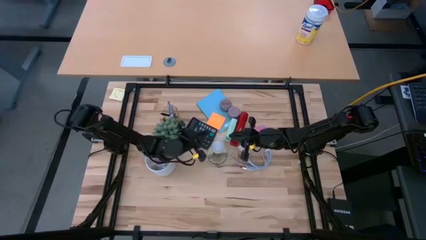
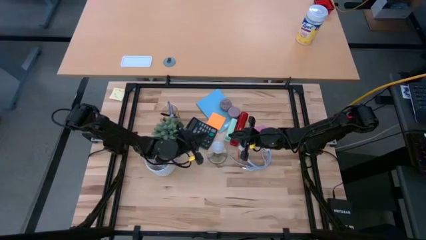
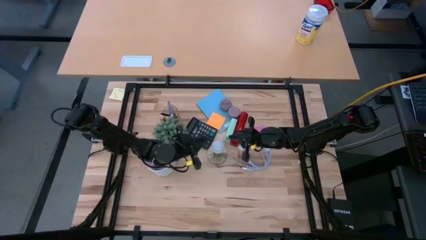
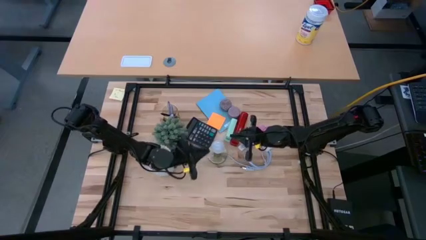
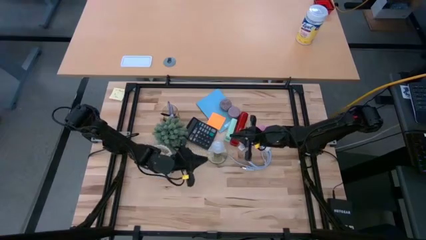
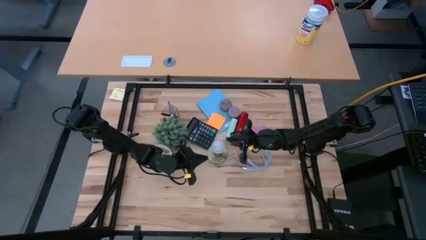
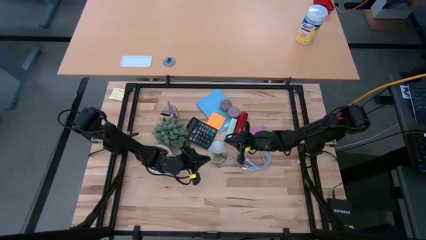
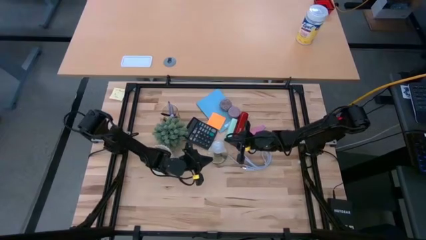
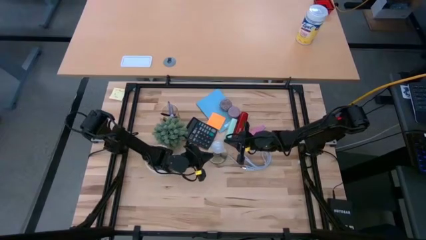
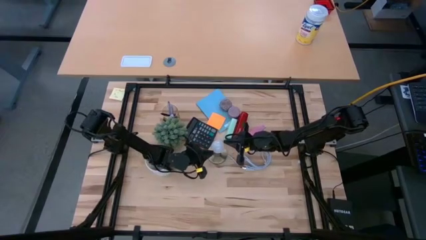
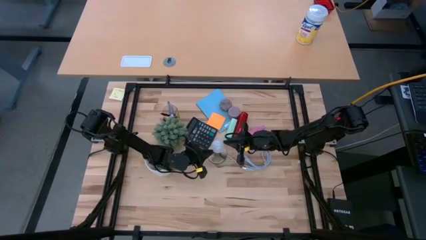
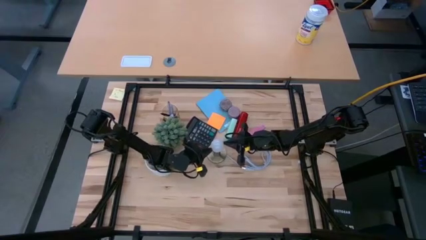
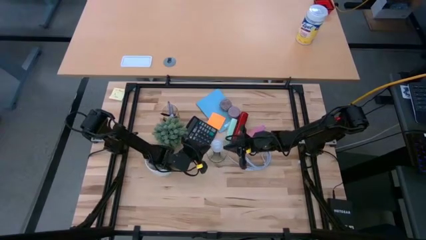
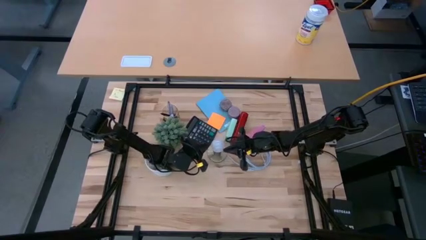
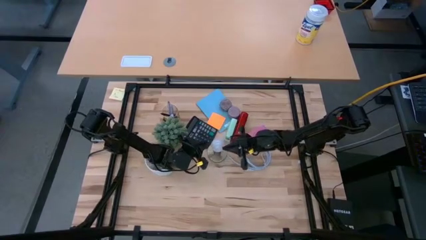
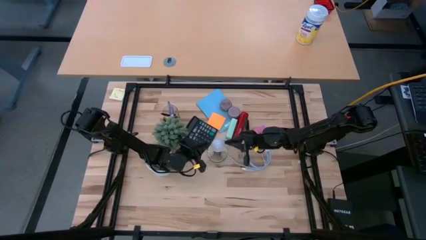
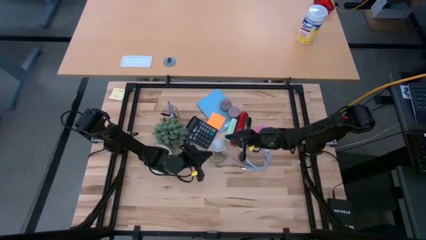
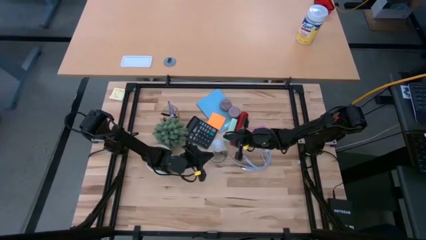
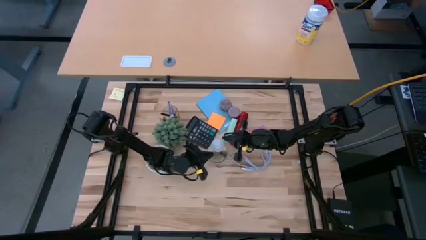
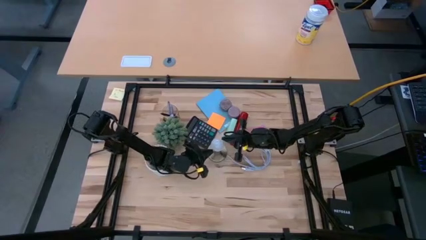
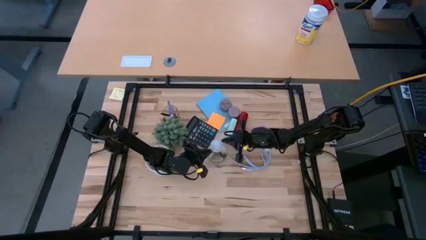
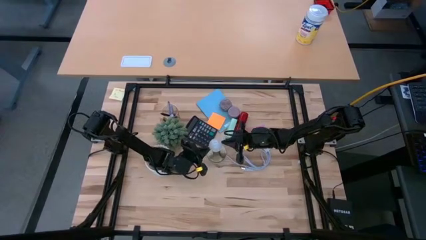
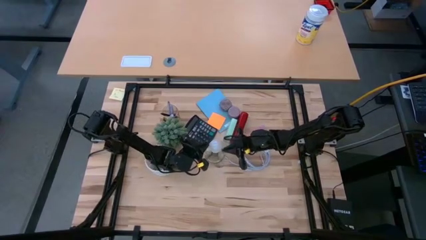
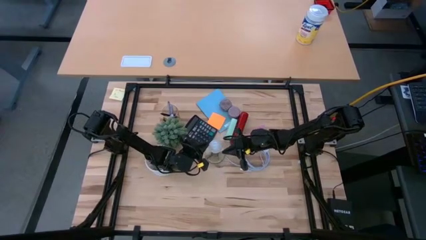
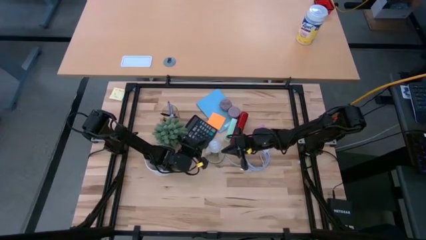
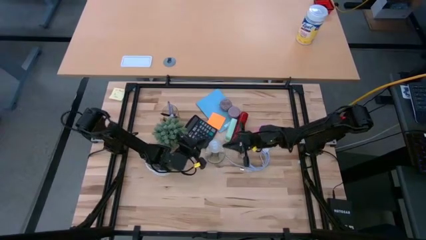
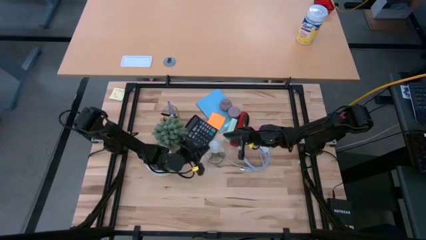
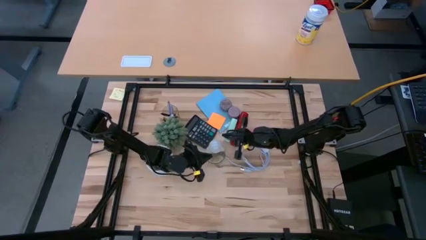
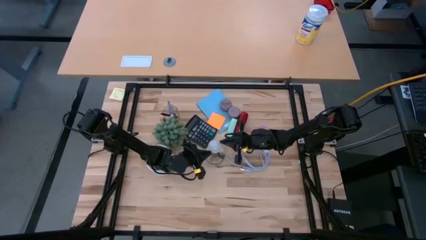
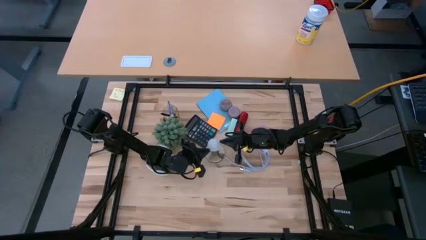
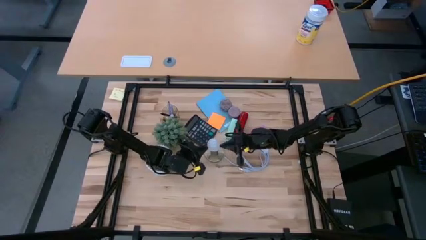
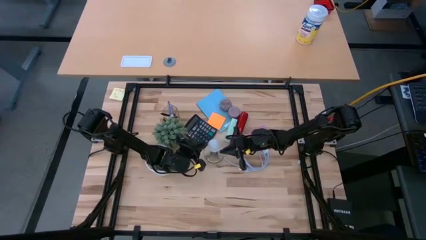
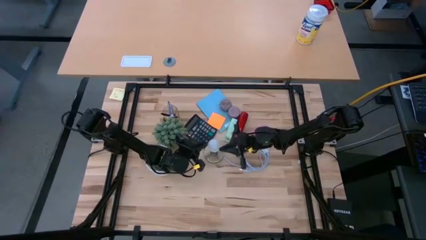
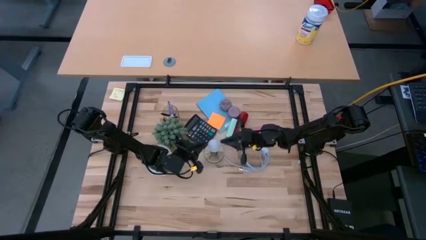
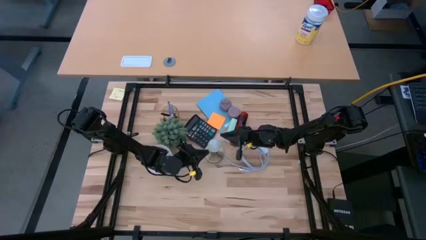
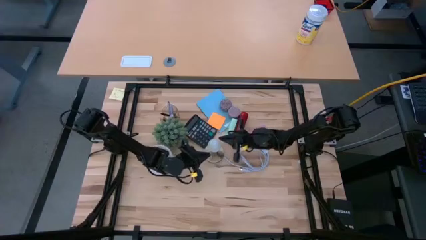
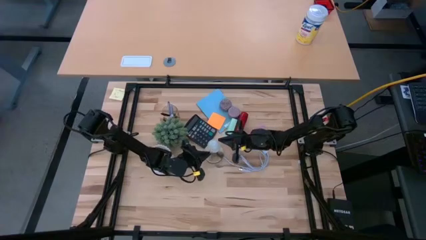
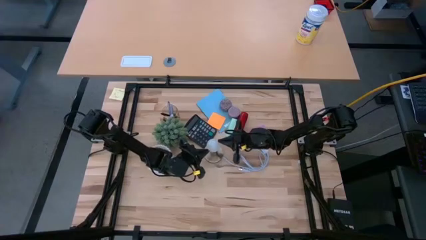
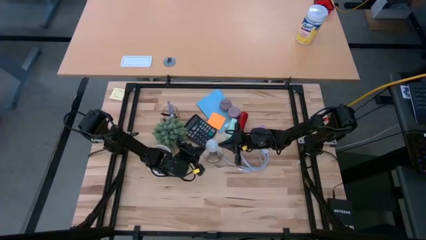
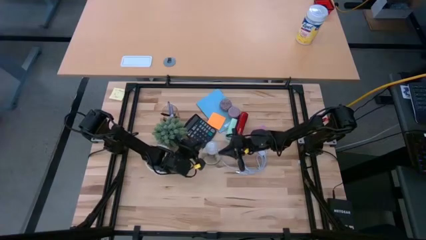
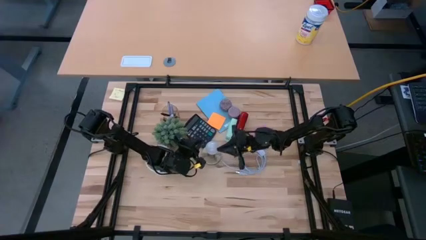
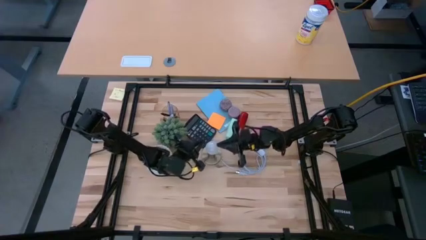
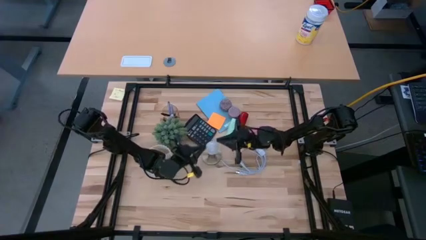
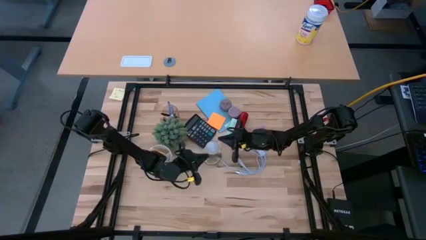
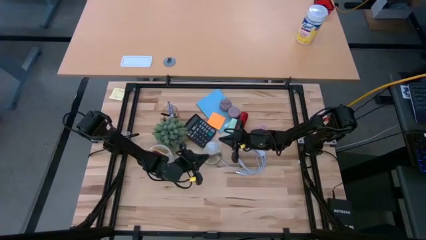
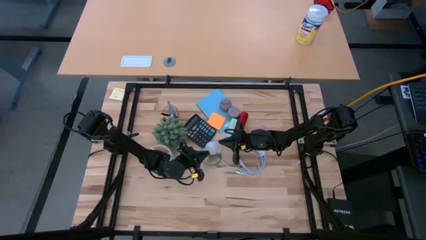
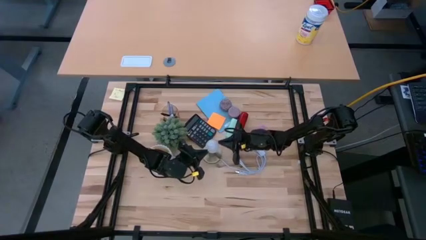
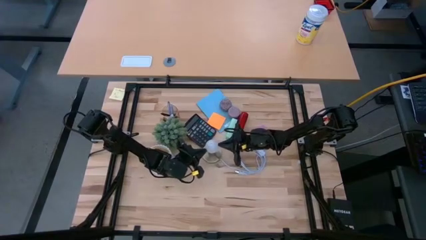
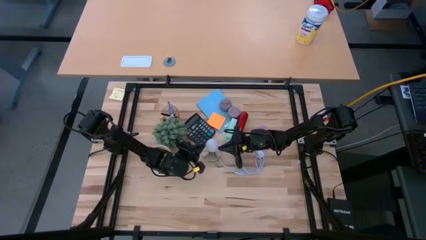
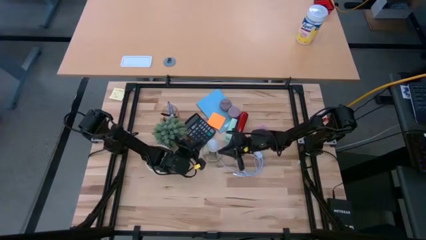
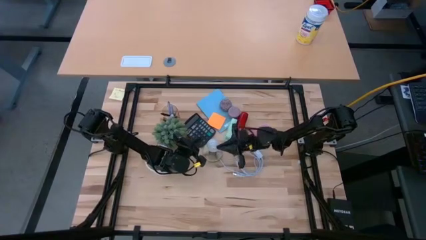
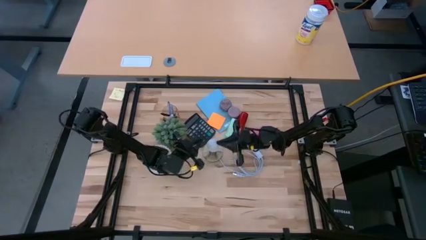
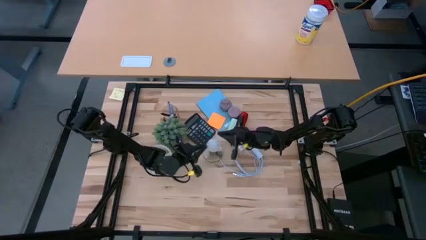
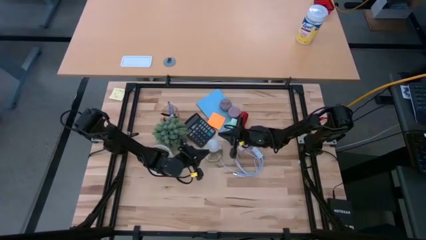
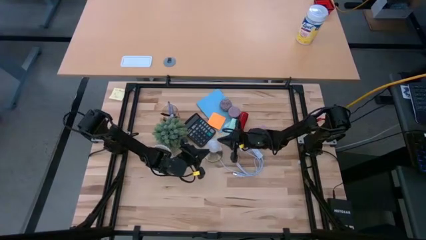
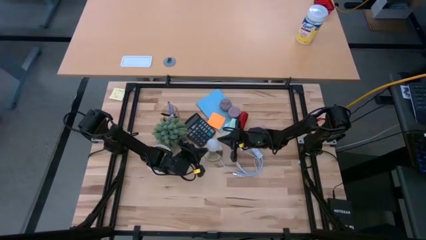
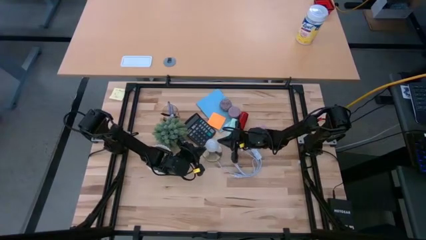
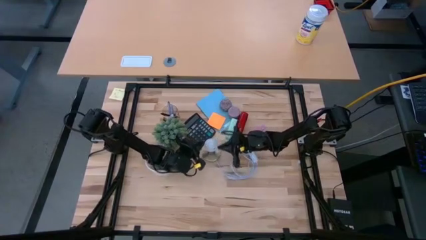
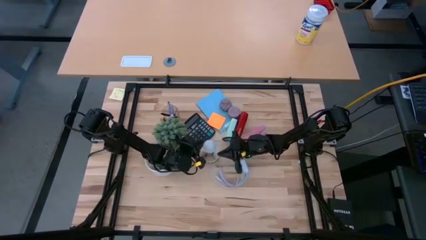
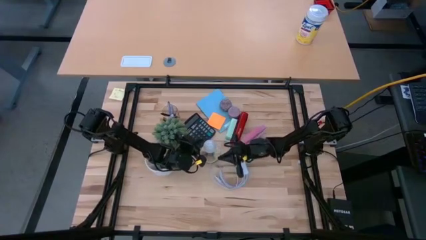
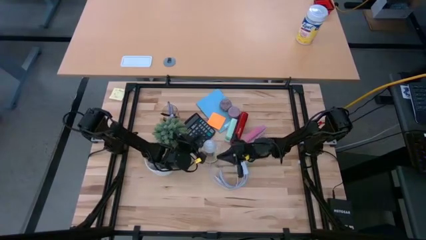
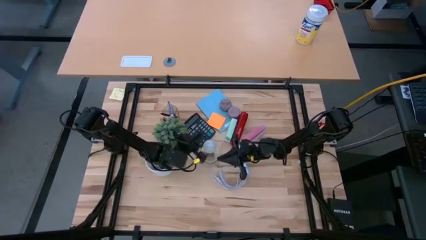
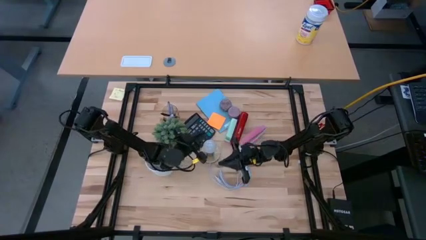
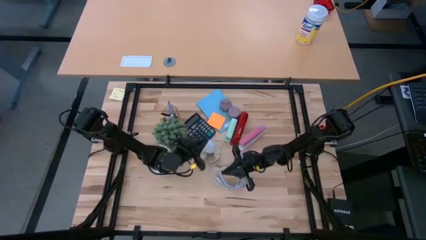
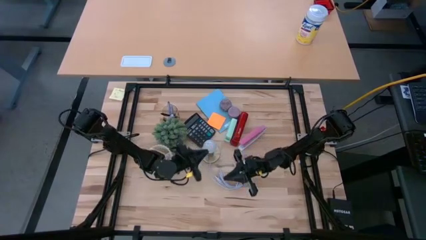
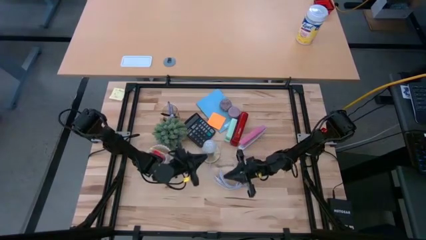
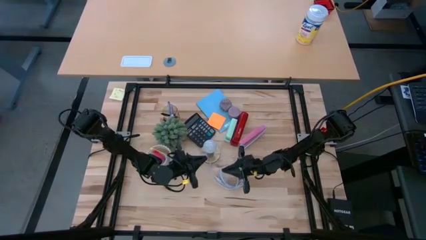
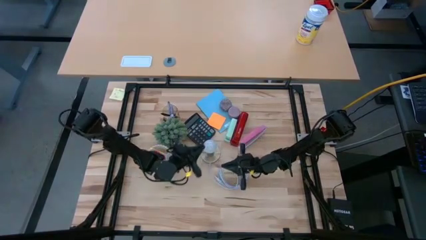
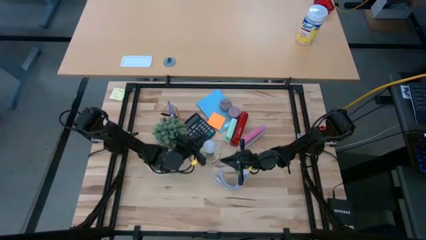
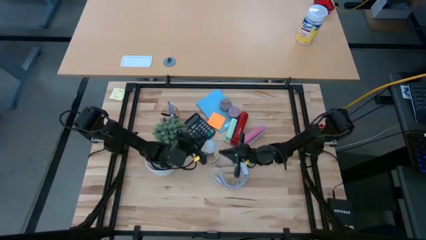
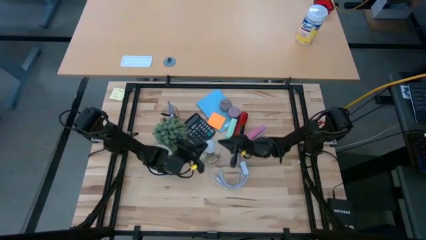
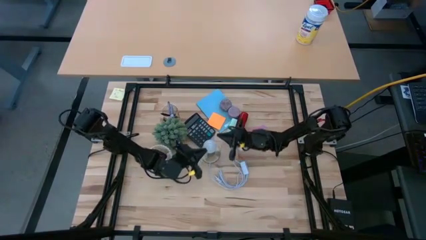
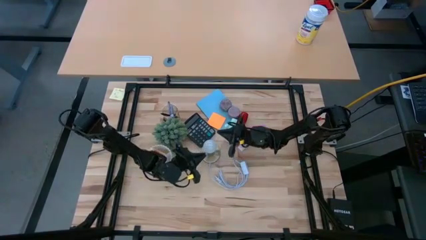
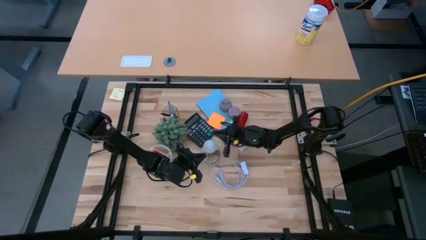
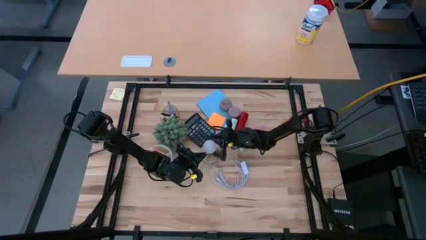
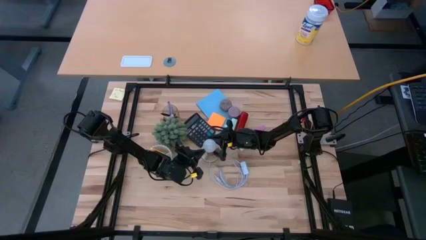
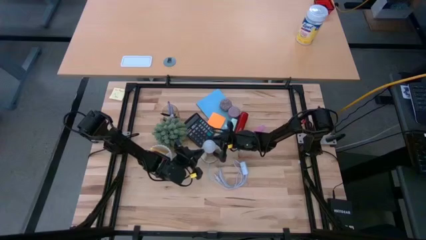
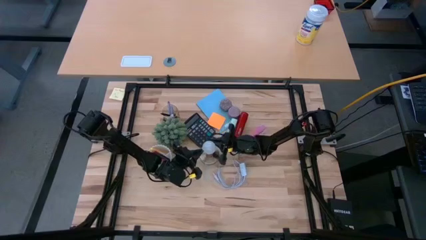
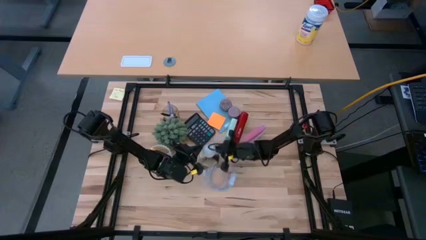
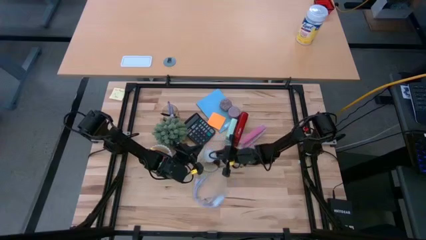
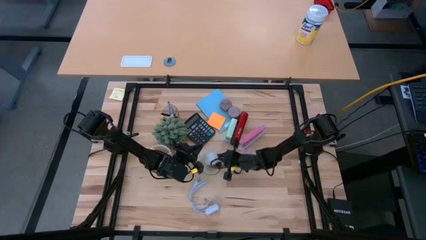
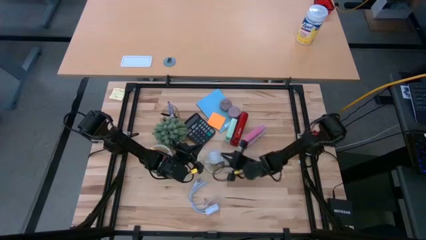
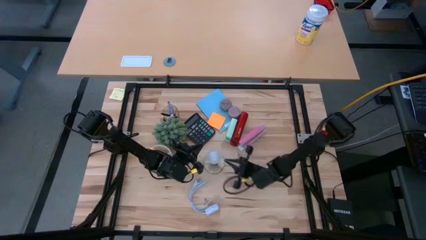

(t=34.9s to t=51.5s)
Task: Screw lightbulb
Insert the lightbulb into the lamp
